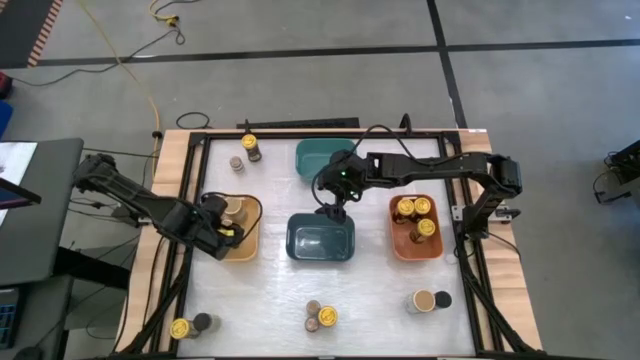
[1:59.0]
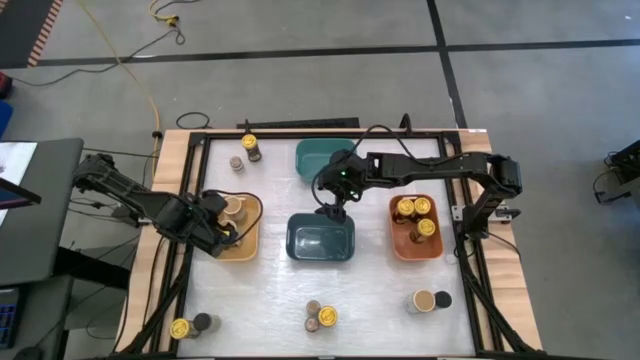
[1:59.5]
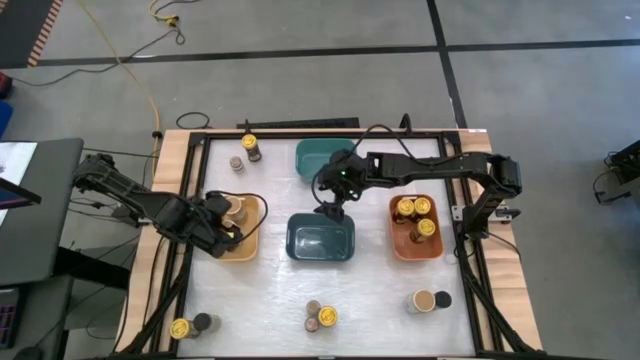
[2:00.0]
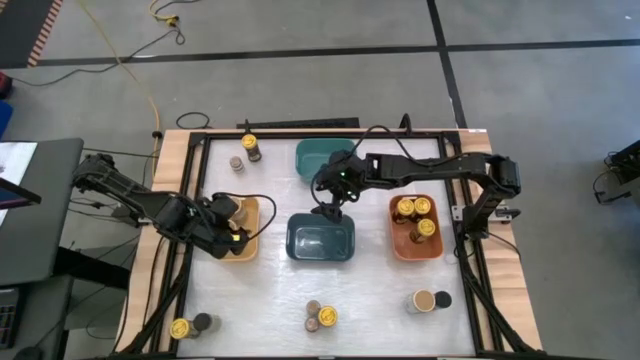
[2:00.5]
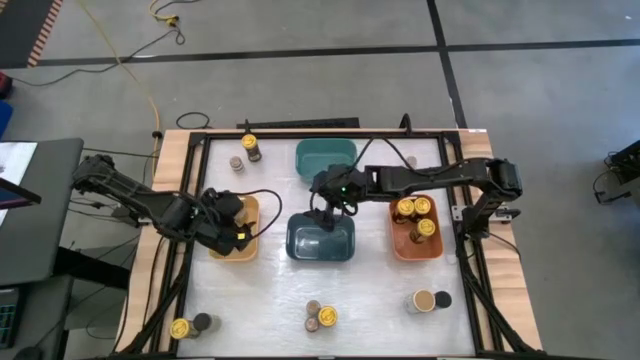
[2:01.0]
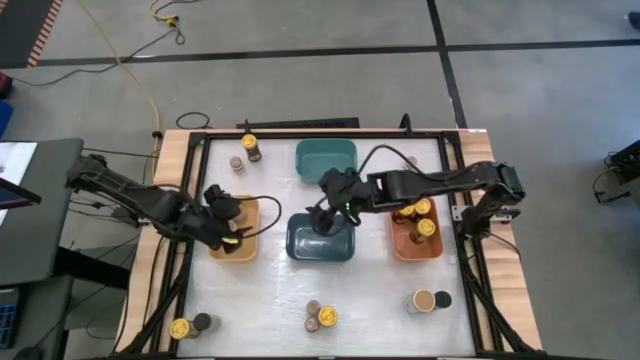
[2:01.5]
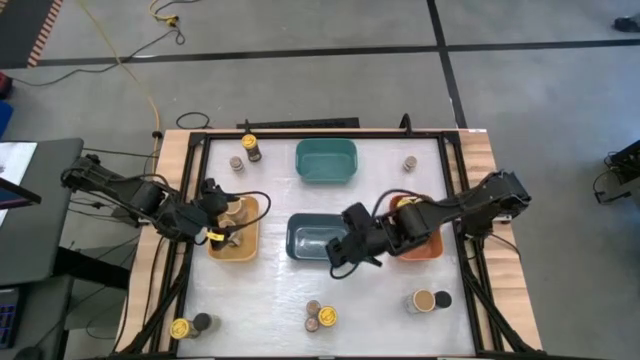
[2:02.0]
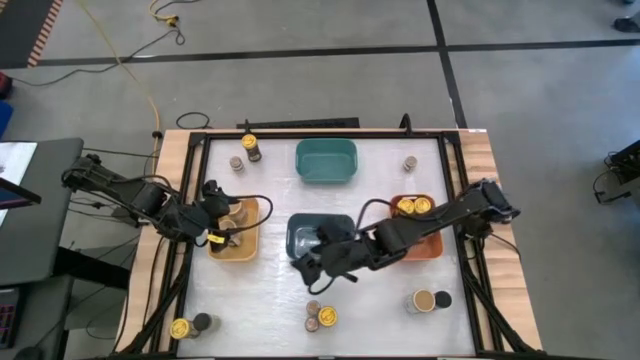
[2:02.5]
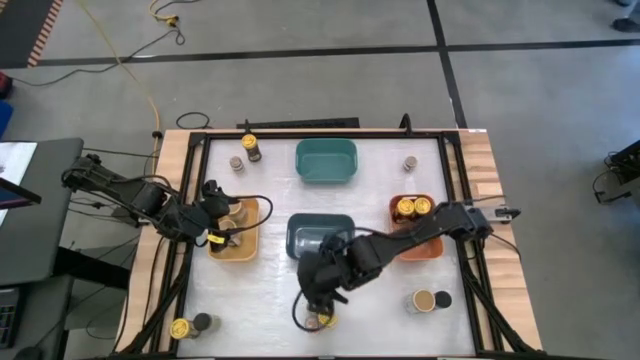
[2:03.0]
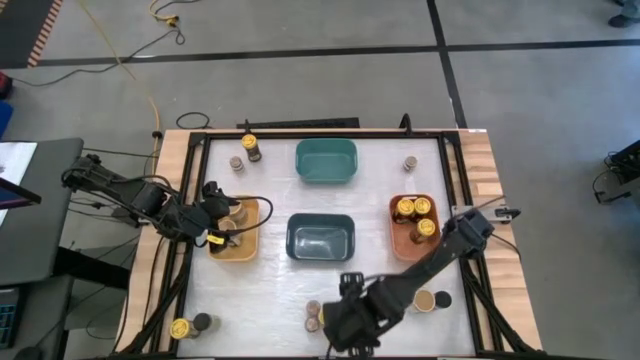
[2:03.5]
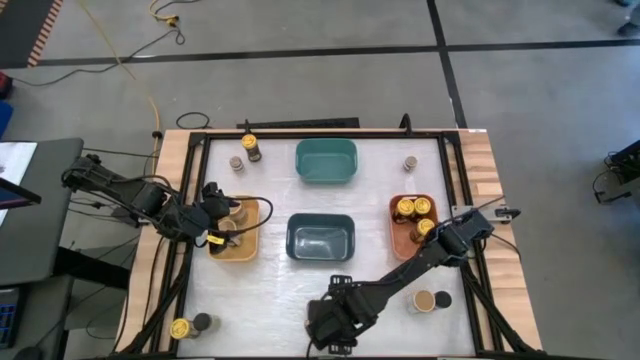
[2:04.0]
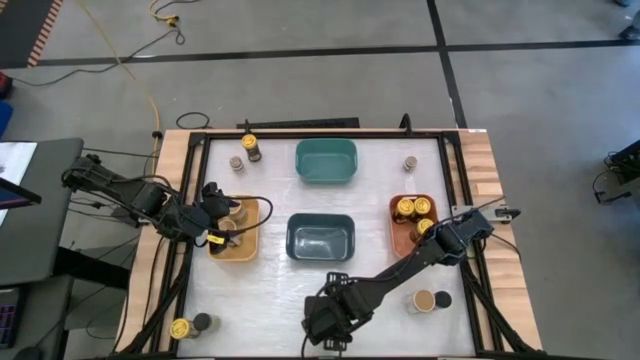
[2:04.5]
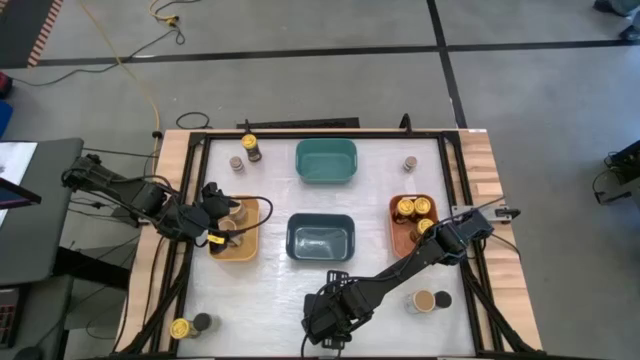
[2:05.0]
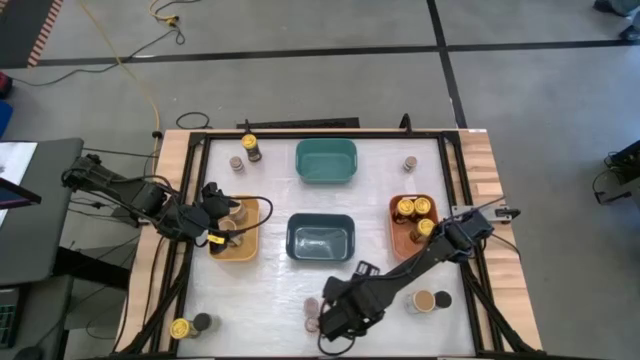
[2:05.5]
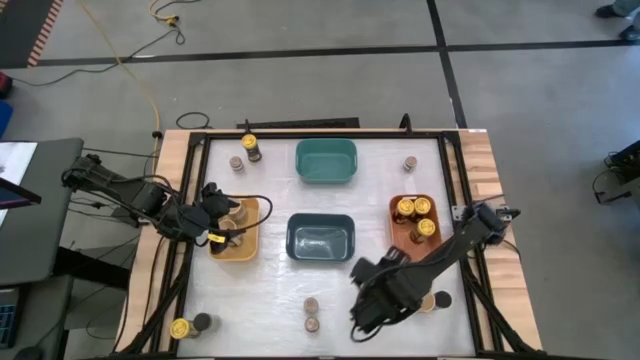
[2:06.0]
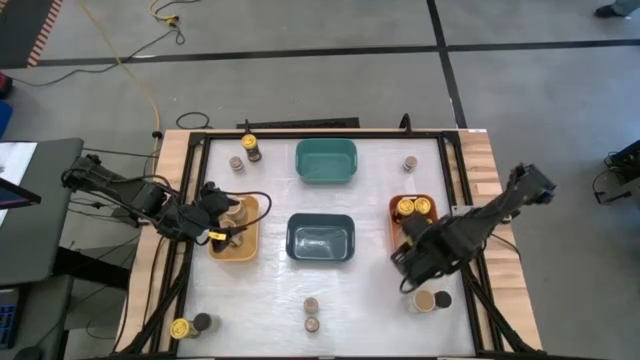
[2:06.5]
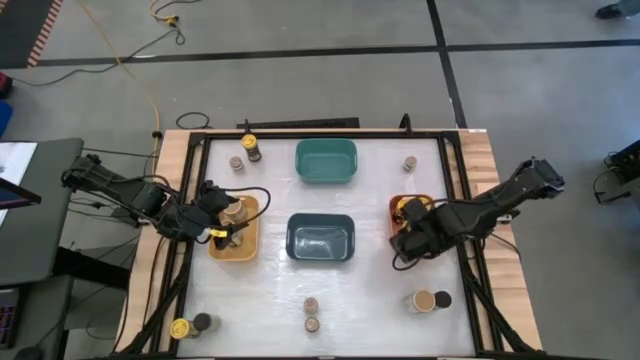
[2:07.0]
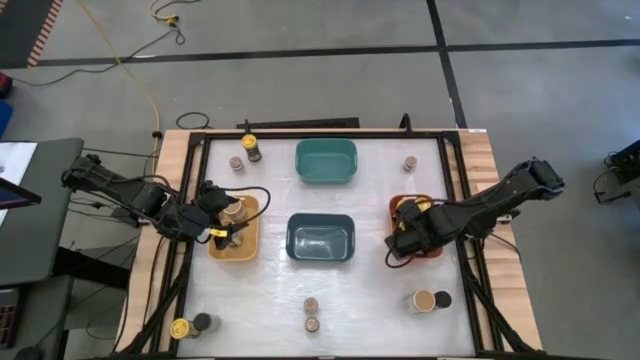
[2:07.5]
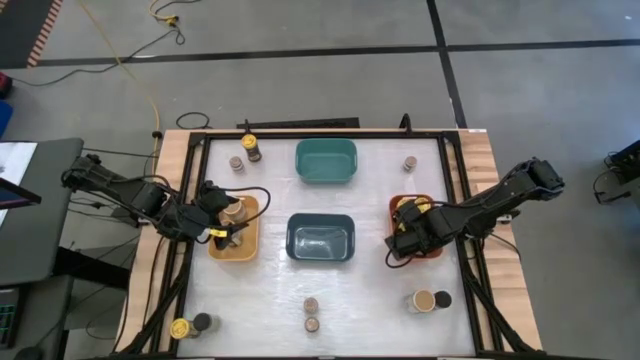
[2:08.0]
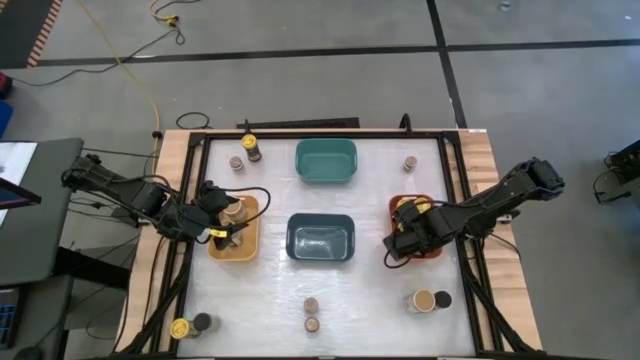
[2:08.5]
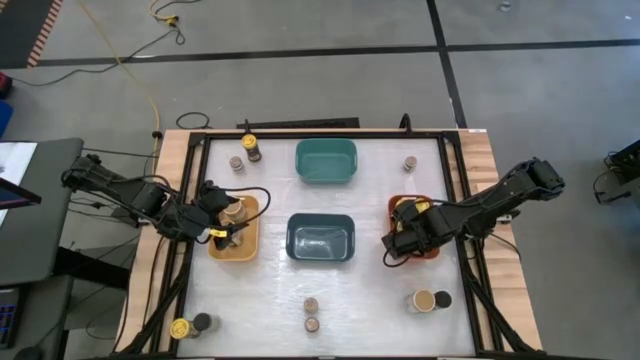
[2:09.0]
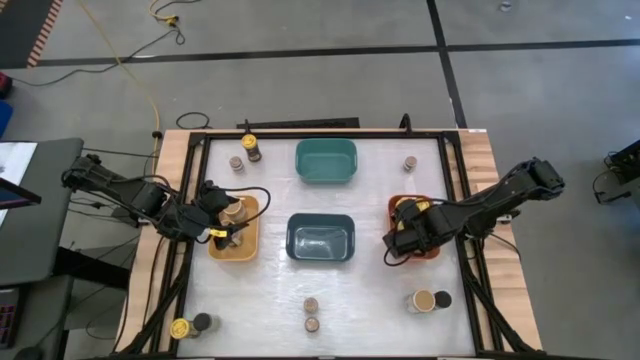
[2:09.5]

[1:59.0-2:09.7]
Task: Sort spices by type
Put the yellow seasoning bottle into the orange bin

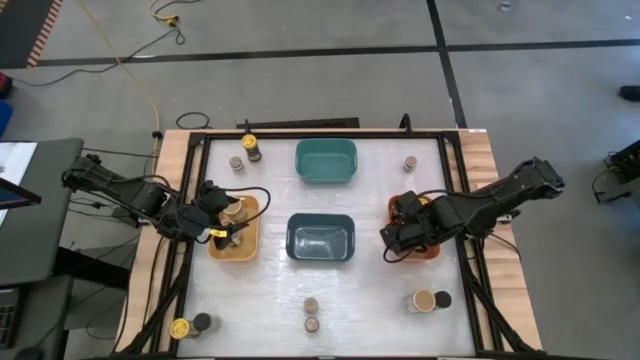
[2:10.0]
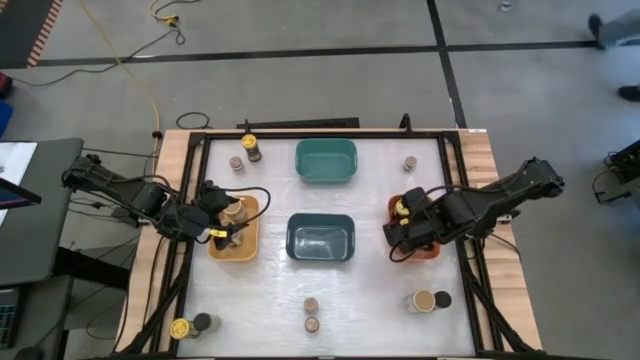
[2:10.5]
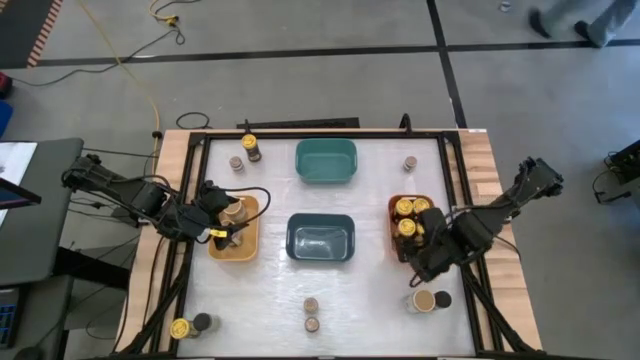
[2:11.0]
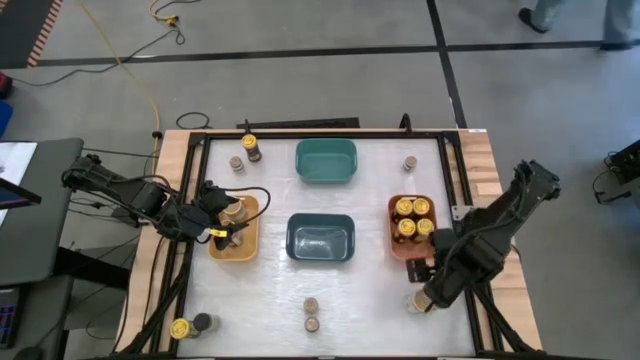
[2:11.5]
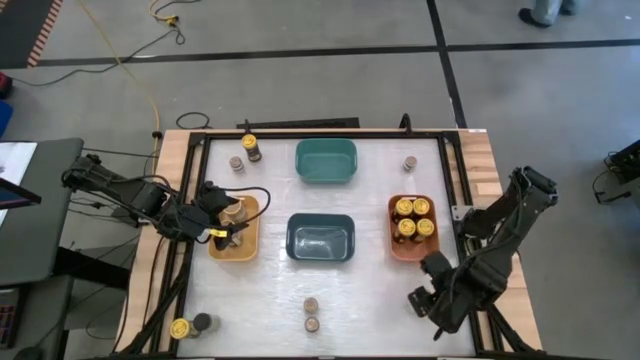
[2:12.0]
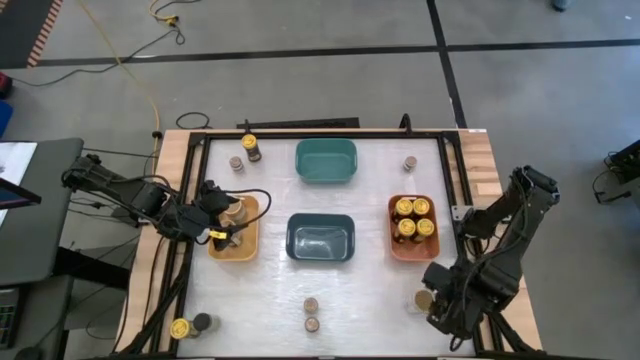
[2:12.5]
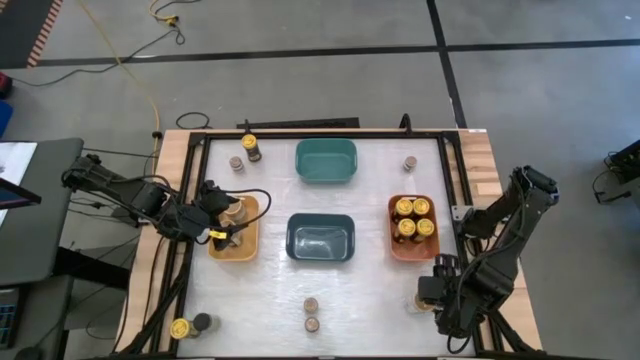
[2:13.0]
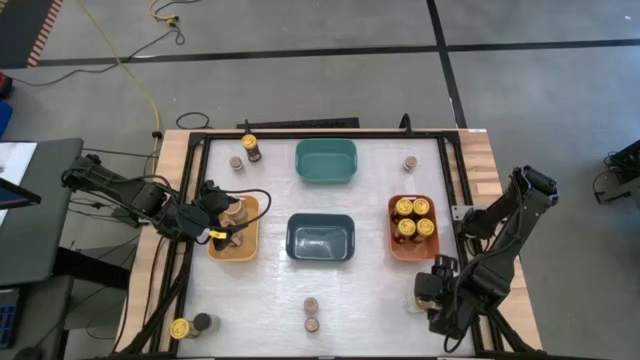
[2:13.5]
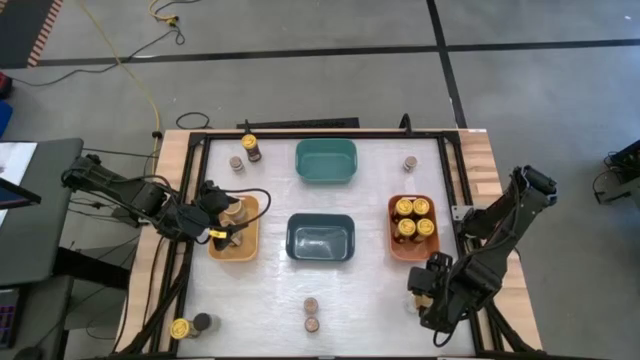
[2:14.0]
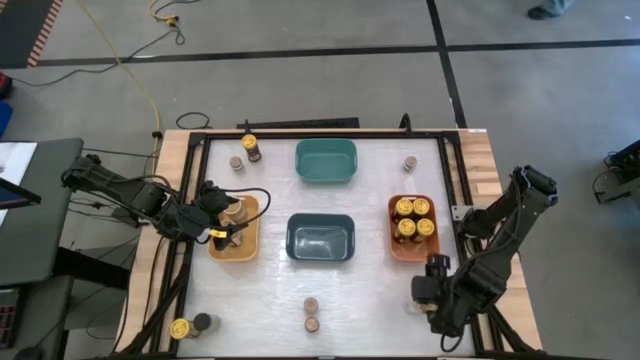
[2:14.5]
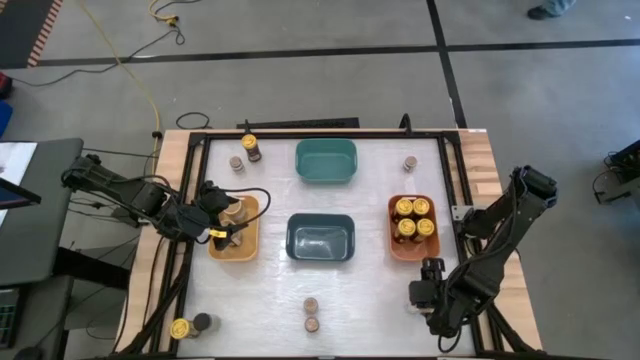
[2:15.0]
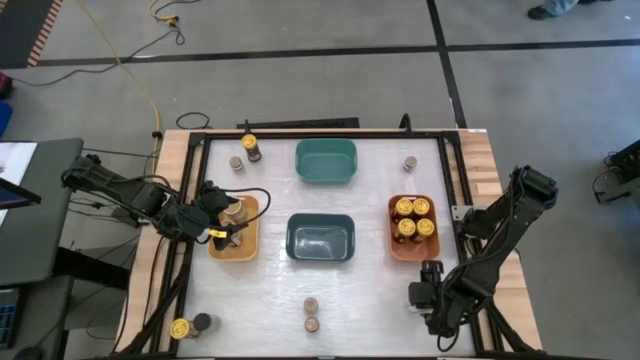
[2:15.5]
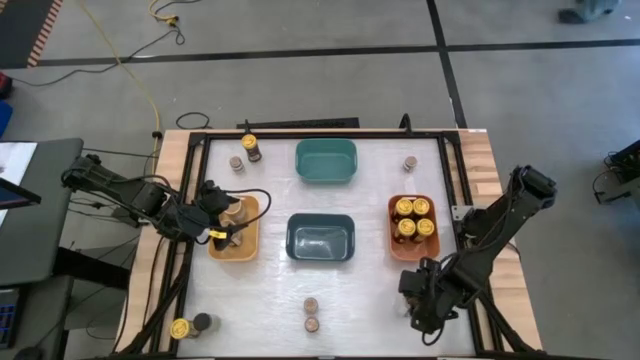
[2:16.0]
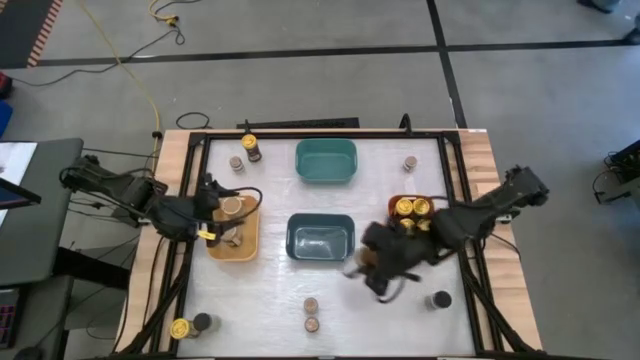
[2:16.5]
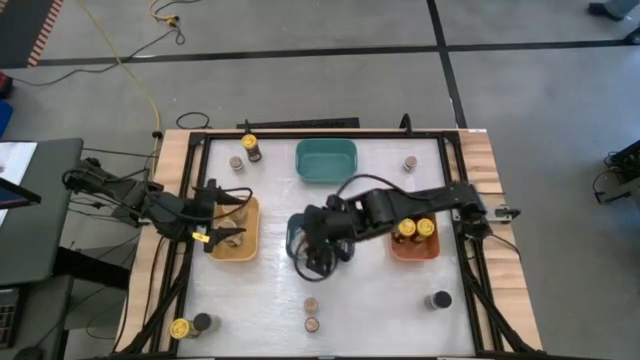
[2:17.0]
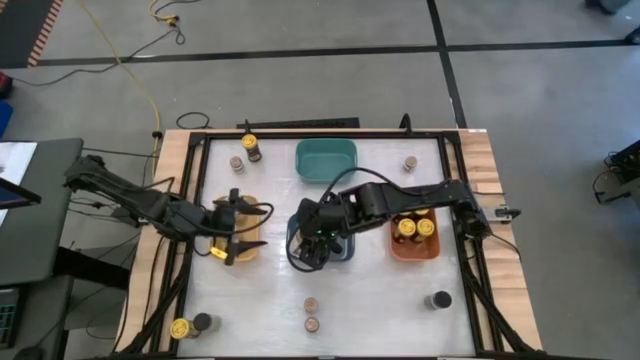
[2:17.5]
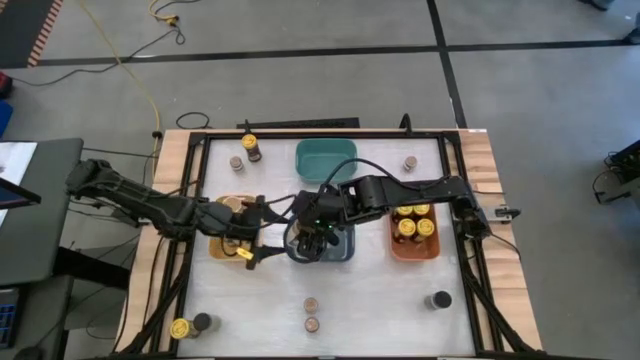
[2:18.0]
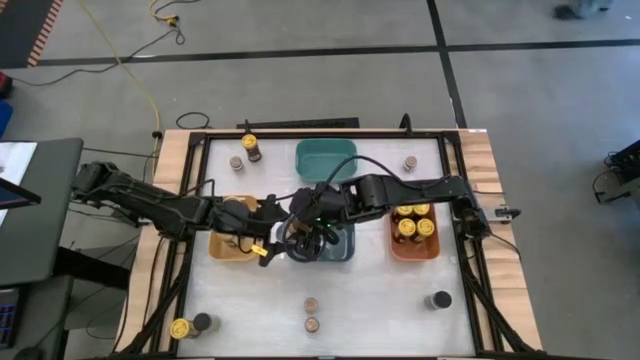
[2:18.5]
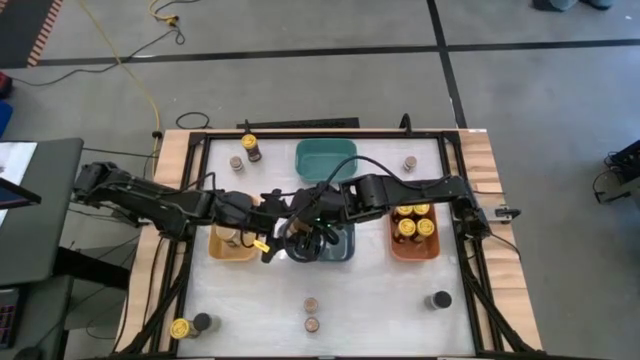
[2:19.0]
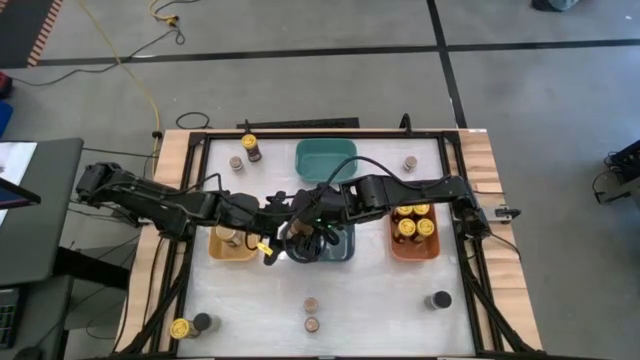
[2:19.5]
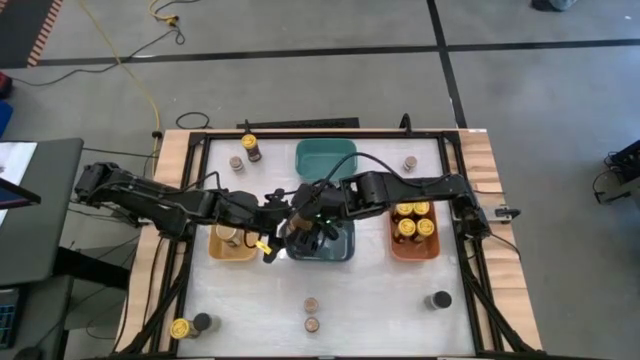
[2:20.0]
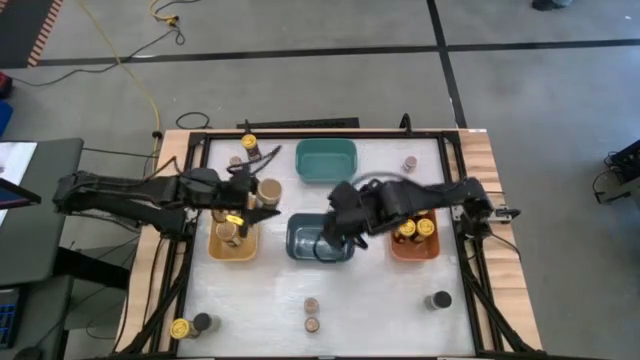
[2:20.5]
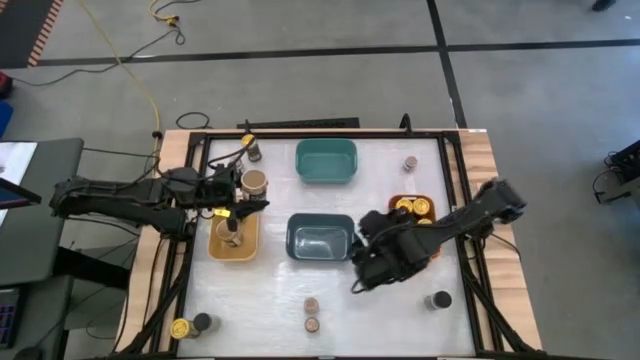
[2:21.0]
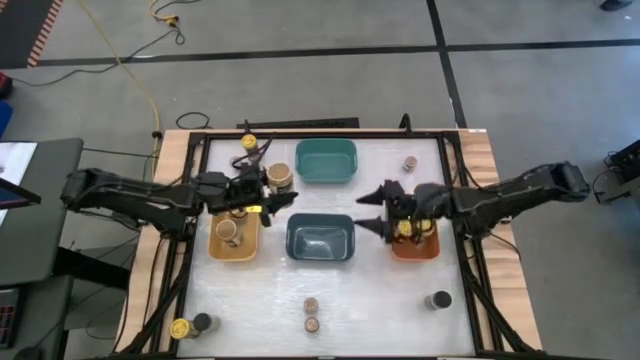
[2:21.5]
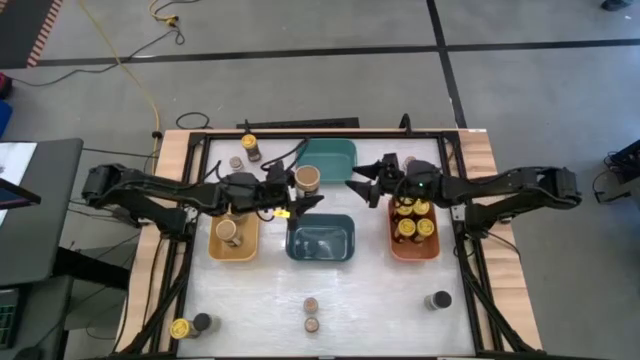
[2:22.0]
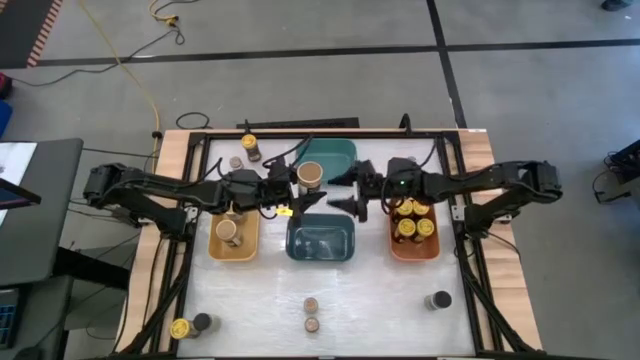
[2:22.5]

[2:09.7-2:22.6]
Put the gold seasoning bottle into the yellow bin
